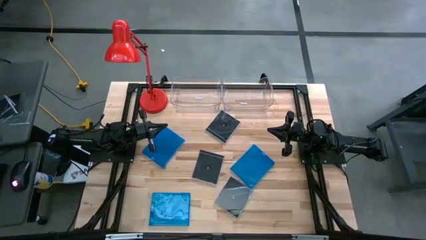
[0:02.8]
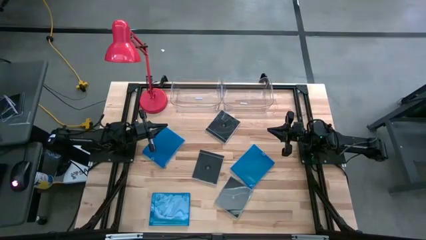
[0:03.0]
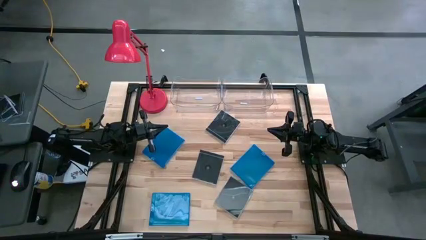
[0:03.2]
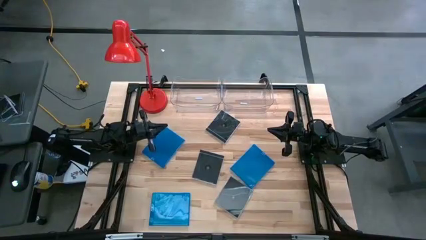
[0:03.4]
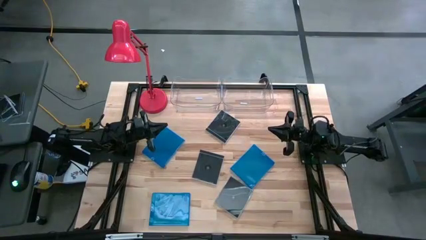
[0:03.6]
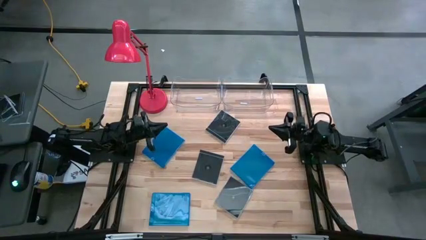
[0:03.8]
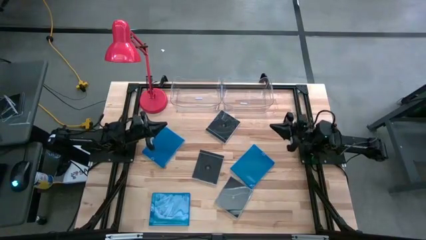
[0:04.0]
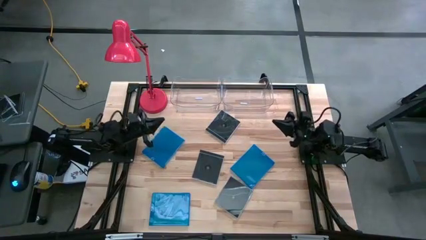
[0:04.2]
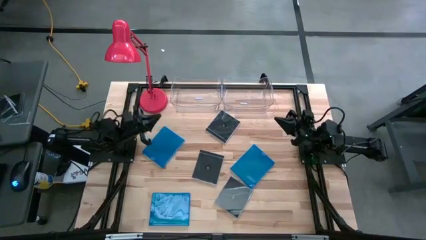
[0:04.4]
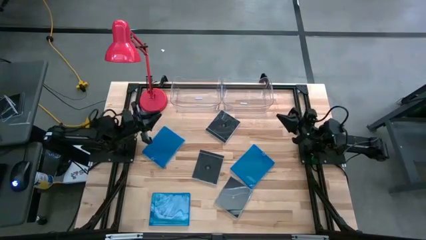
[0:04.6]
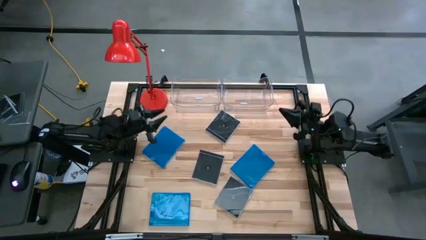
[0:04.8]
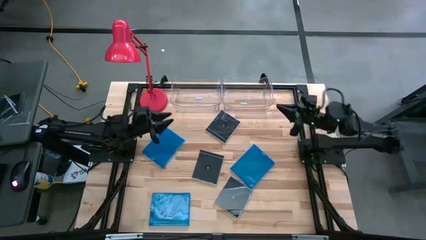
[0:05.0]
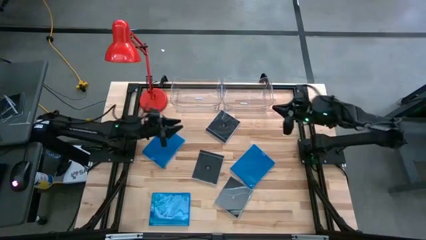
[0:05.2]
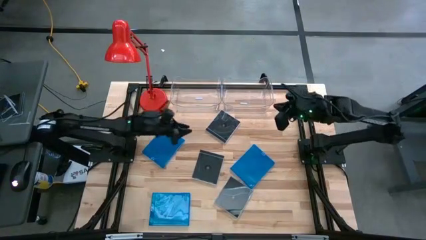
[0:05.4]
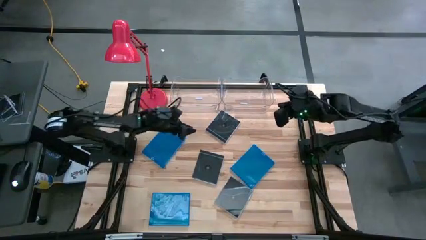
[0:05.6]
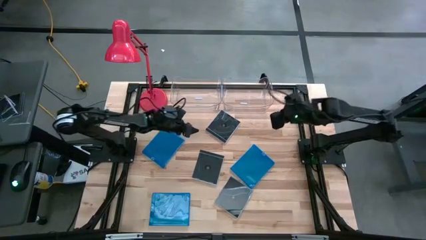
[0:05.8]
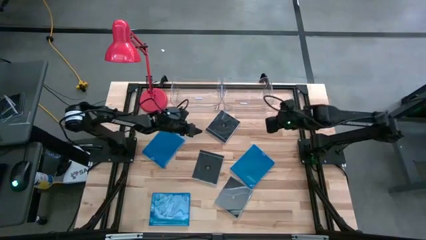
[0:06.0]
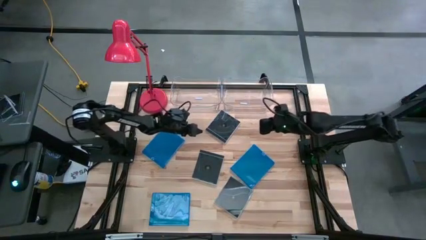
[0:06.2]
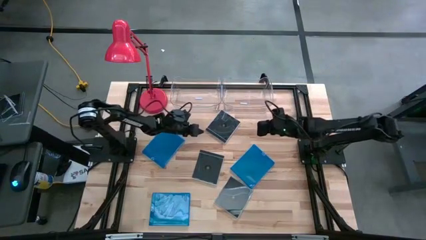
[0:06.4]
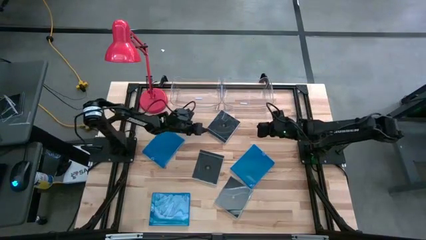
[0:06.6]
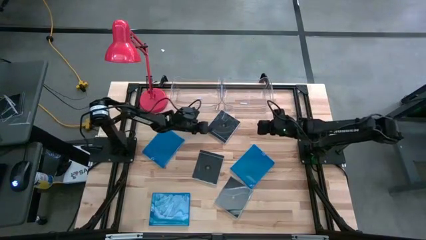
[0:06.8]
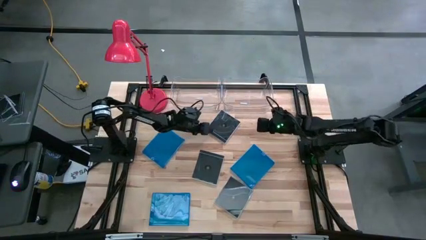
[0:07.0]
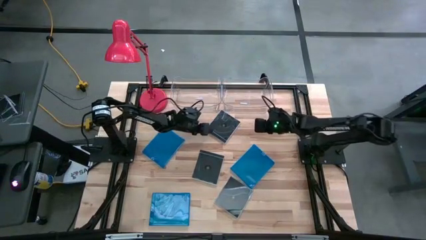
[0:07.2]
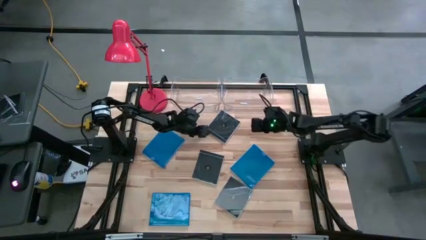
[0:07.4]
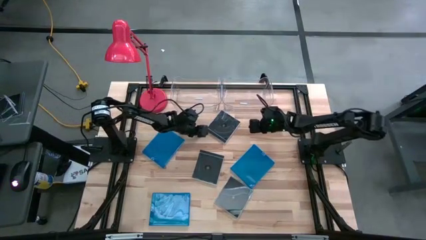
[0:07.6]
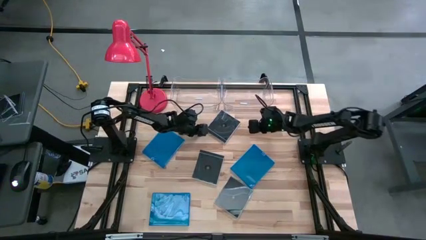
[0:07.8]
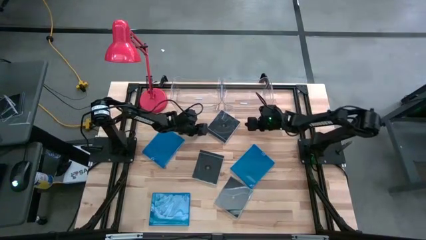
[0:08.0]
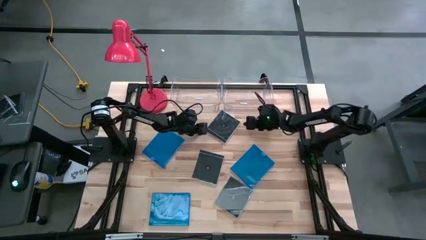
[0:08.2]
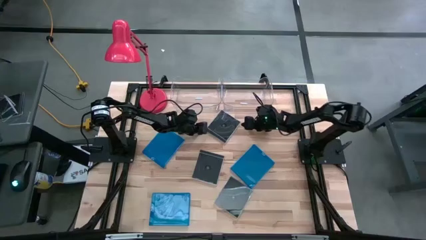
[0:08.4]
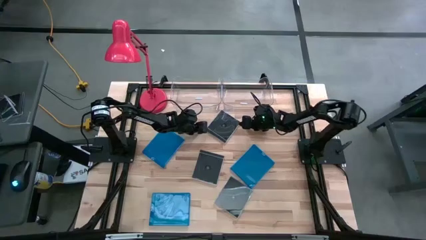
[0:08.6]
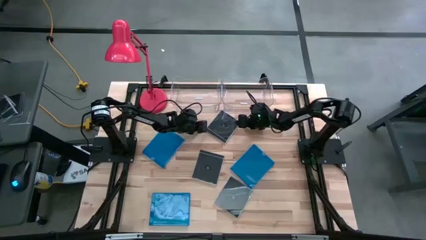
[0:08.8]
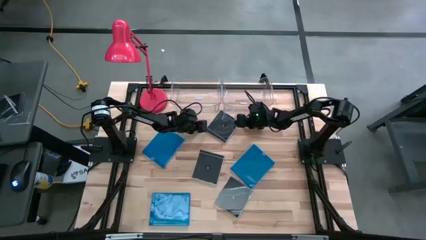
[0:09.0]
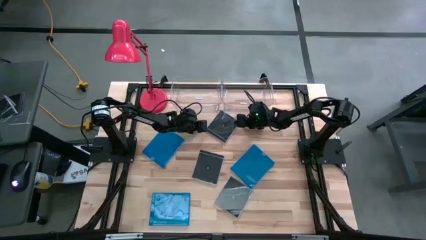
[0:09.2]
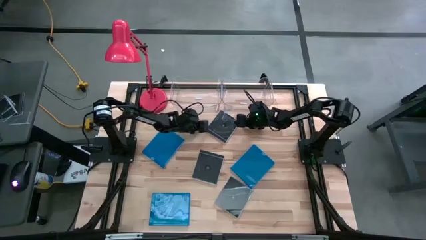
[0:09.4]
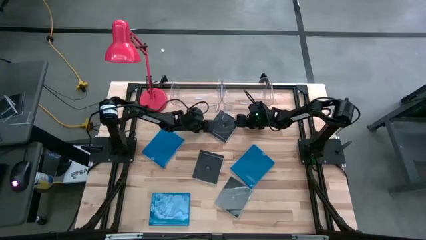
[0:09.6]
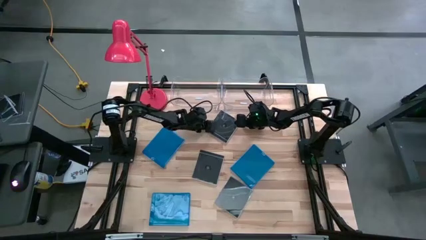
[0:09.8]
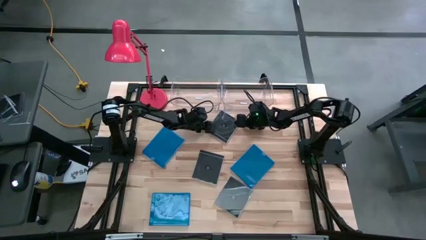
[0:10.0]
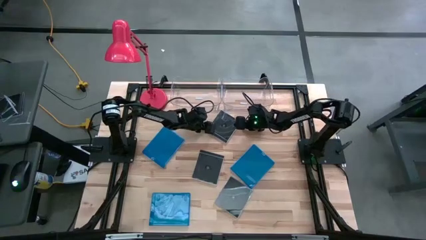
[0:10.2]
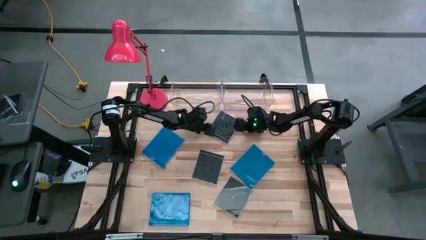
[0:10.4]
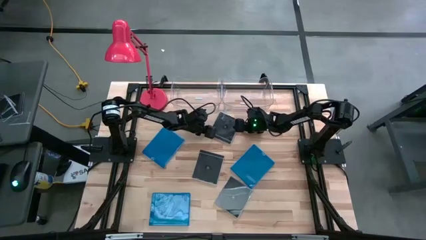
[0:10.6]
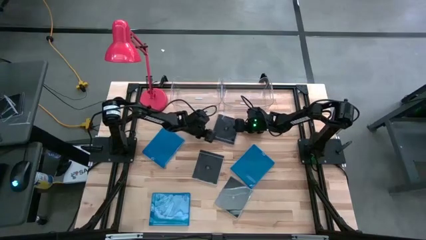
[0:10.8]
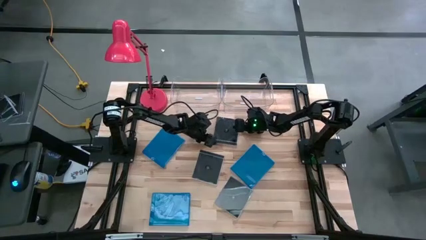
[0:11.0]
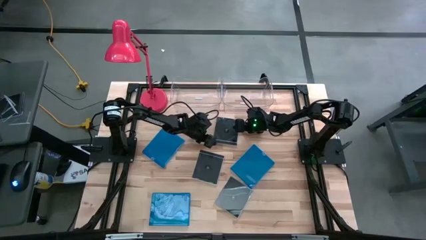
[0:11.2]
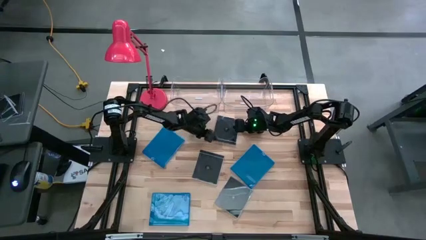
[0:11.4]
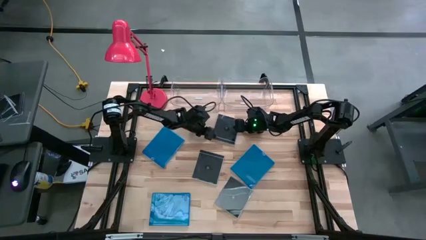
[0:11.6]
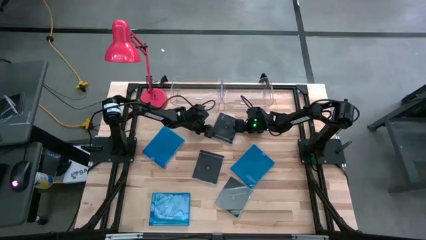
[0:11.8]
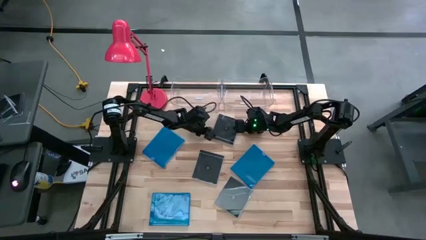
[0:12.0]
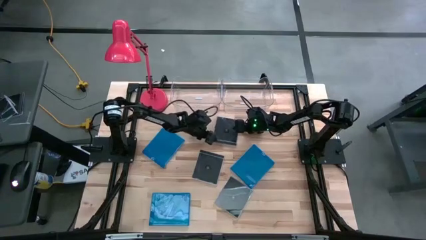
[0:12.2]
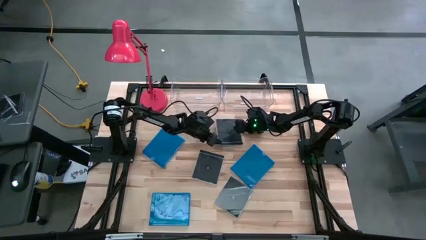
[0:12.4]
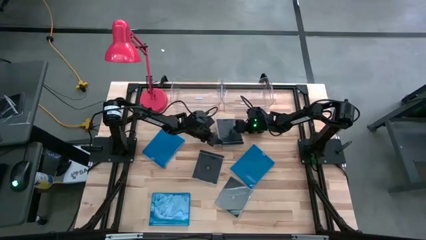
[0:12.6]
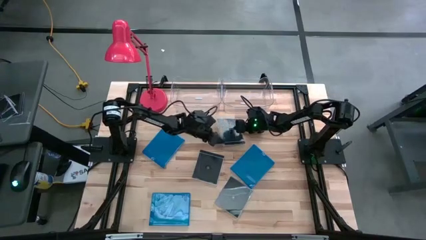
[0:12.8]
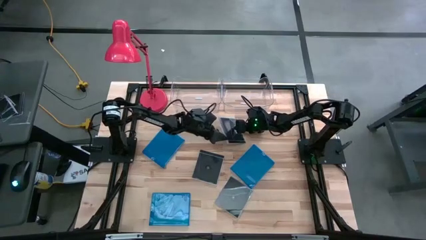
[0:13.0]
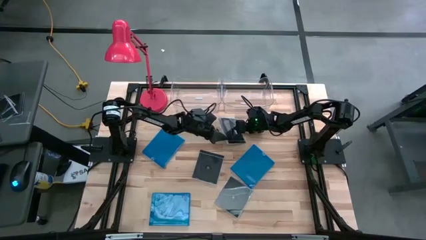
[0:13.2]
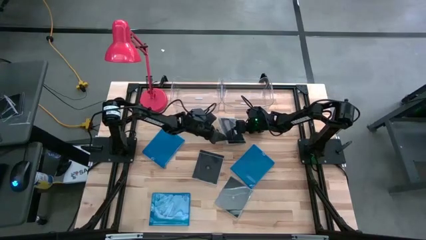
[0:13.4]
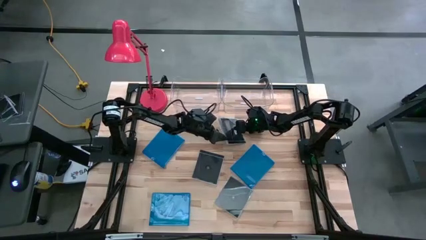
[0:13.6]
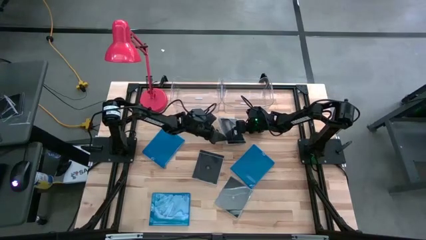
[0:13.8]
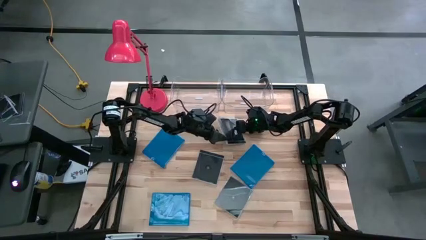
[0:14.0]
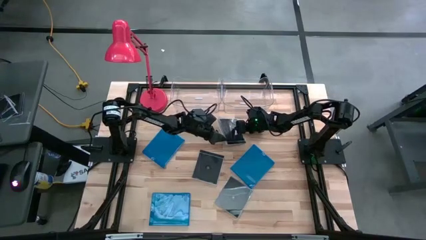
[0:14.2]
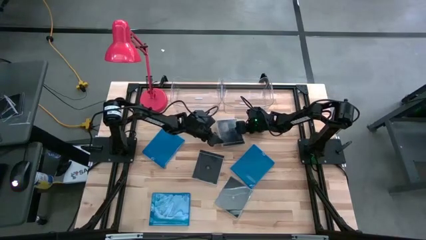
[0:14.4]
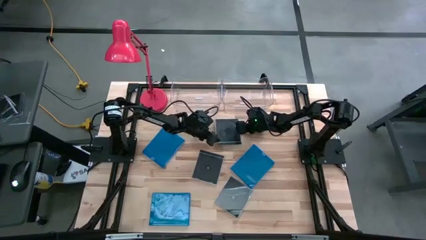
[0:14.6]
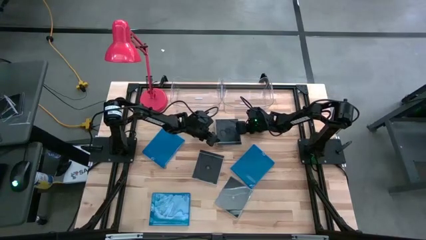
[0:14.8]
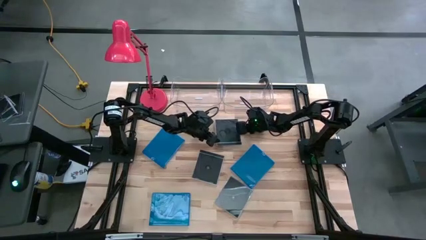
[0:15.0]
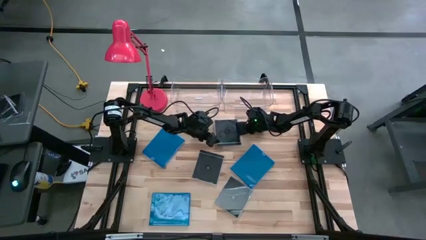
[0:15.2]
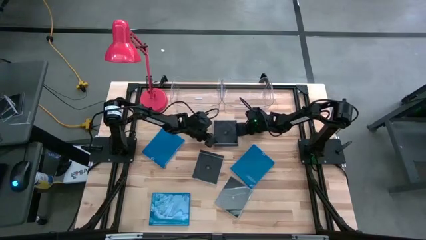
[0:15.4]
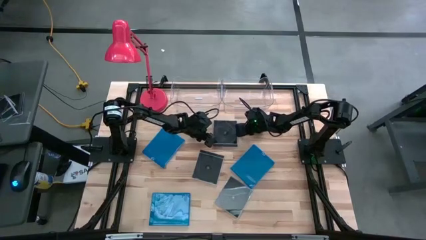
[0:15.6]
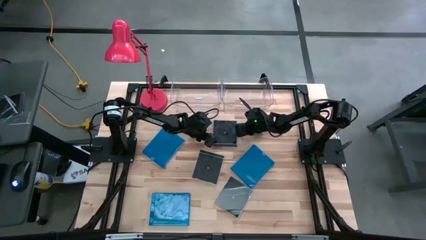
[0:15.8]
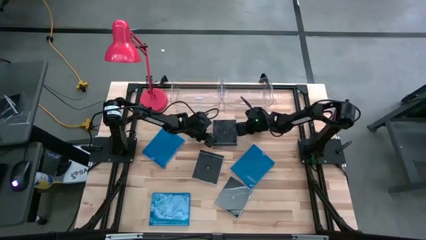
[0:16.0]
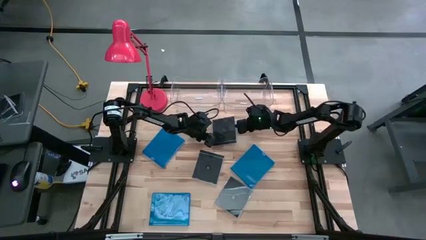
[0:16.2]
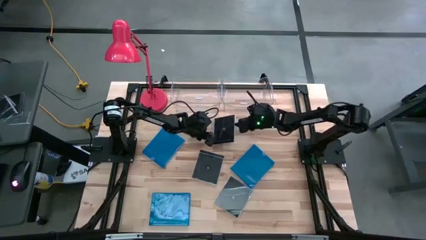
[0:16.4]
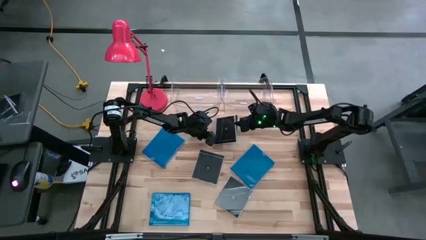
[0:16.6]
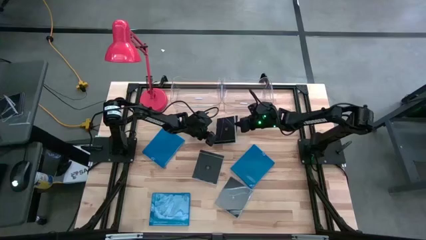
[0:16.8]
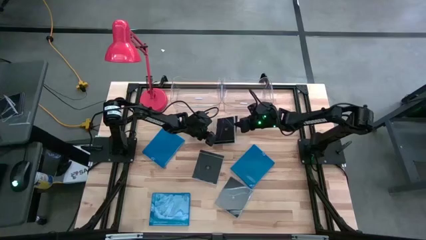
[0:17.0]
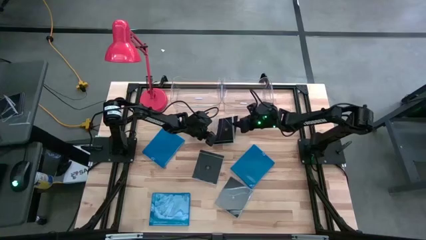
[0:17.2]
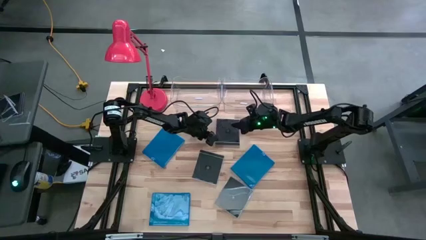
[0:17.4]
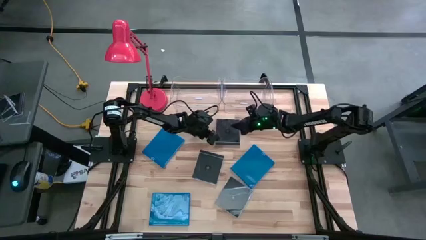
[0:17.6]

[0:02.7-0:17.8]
Task: Pick & place jewel cases by type
Put the top black cd case into the right transparent bin
